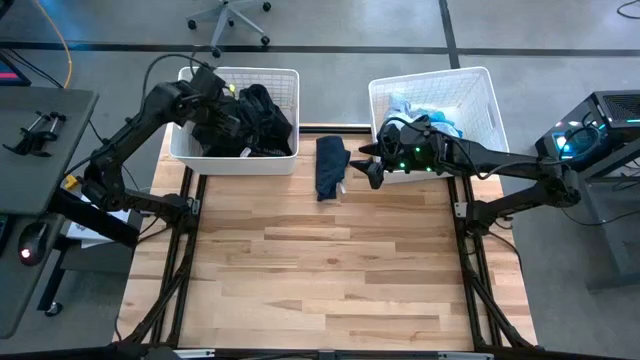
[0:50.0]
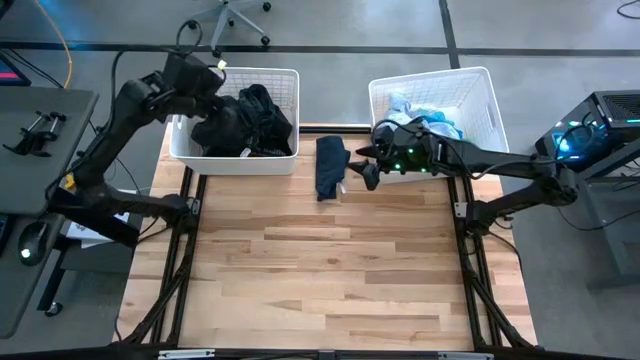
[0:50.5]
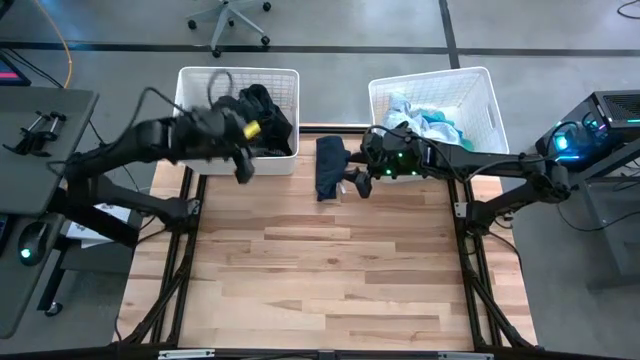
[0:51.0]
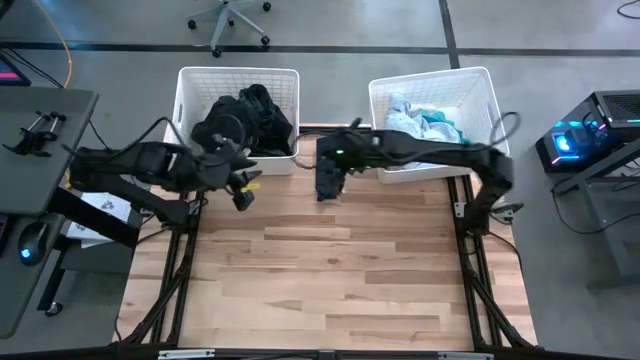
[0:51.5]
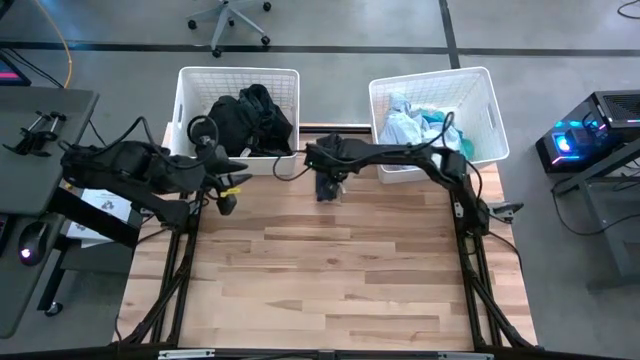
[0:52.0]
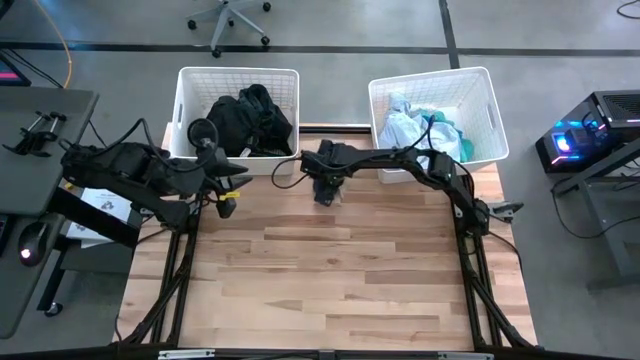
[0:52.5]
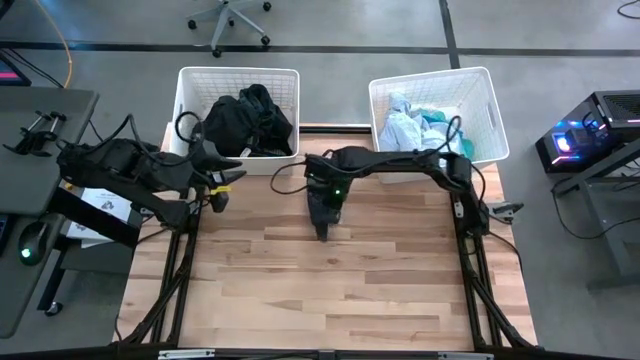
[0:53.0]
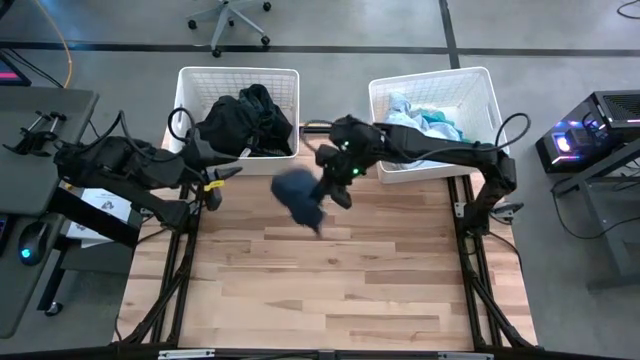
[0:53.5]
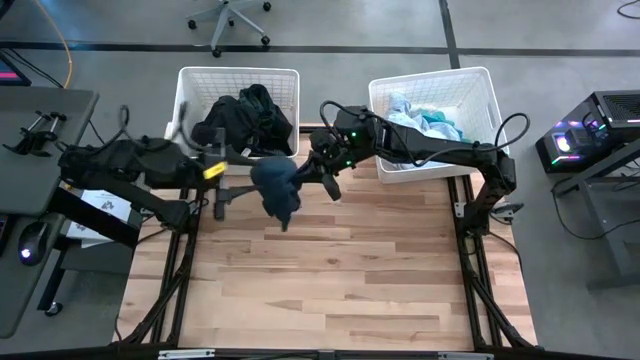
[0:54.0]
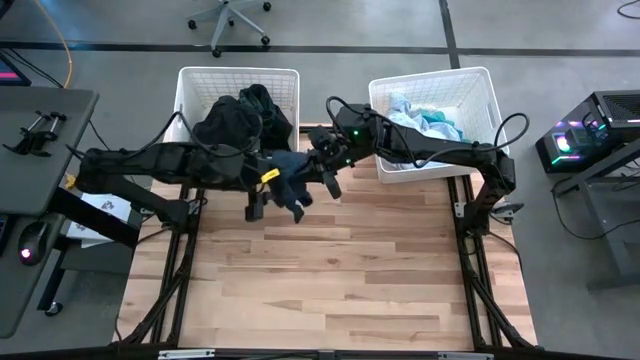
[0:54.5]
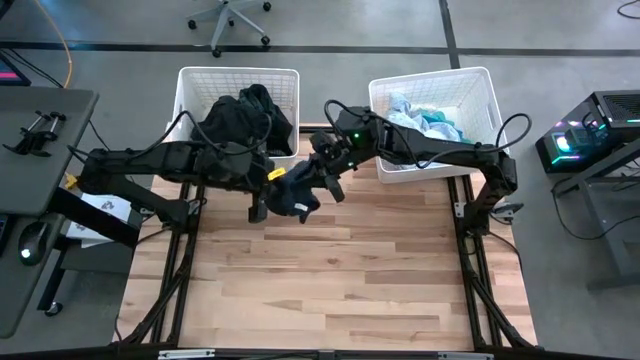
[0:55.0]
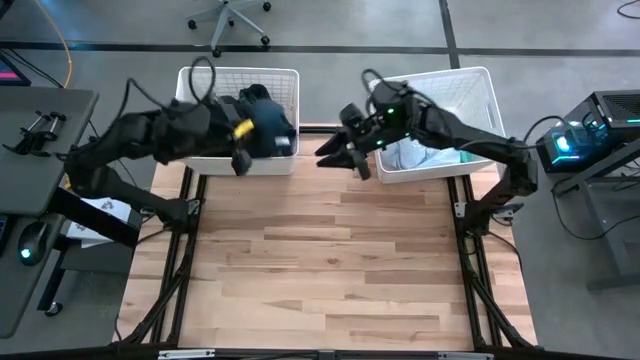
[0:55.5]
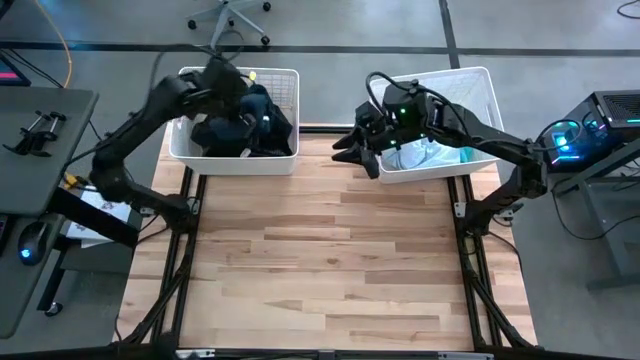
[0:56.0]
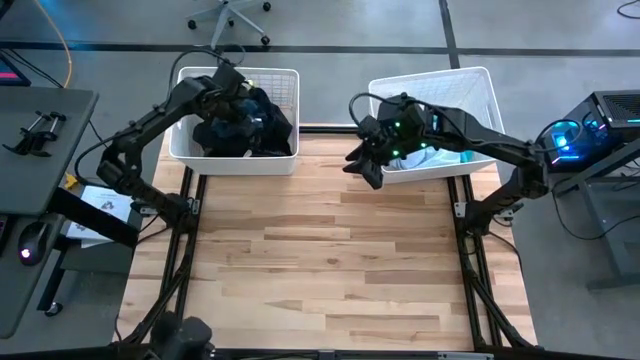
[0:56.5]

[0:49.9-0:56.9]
Task: Sort clothes
Put the dark blue shorts into the left white laundry organizer

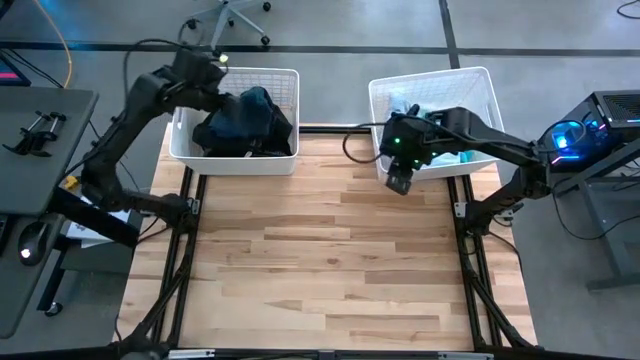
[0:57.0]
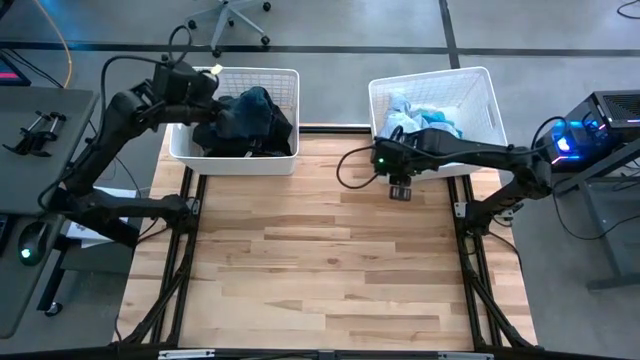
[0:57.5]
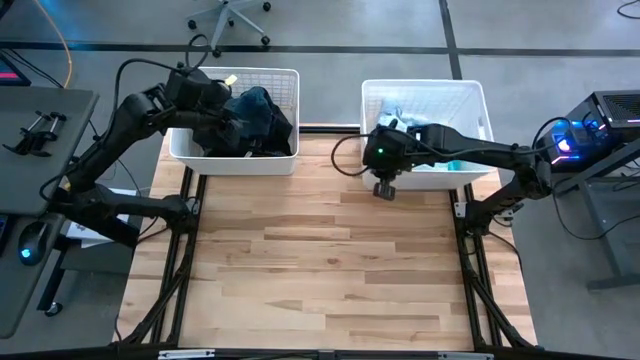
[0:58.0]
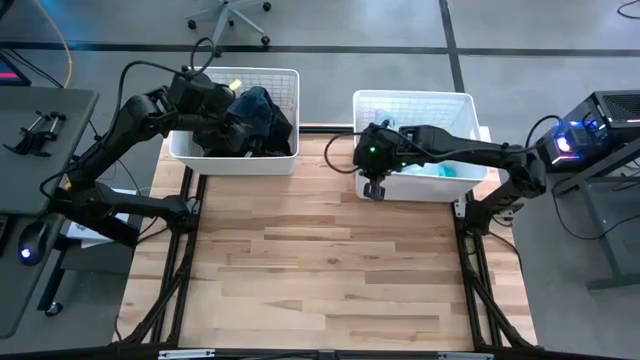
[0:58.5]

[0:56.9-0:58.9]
Adjust the right white laundry organizer

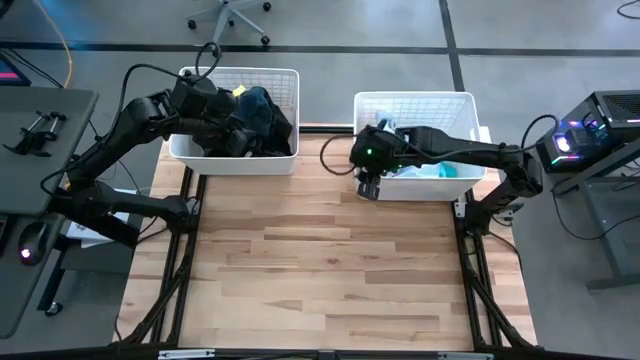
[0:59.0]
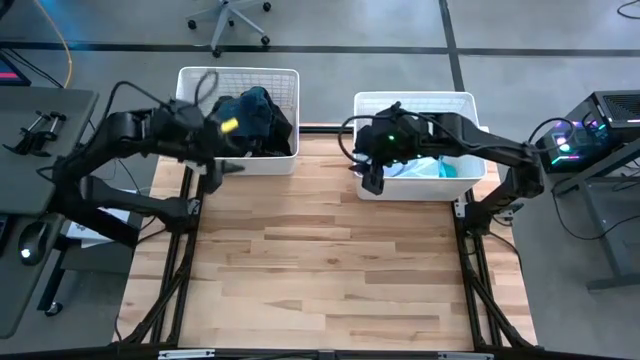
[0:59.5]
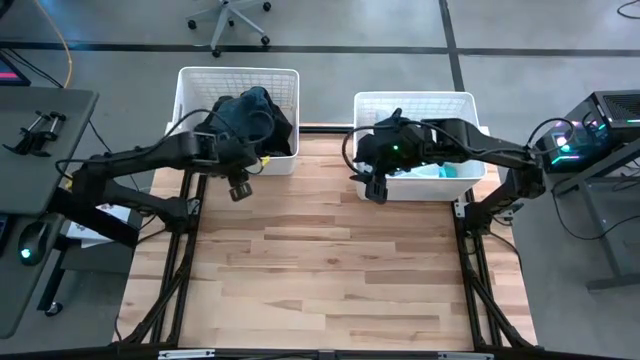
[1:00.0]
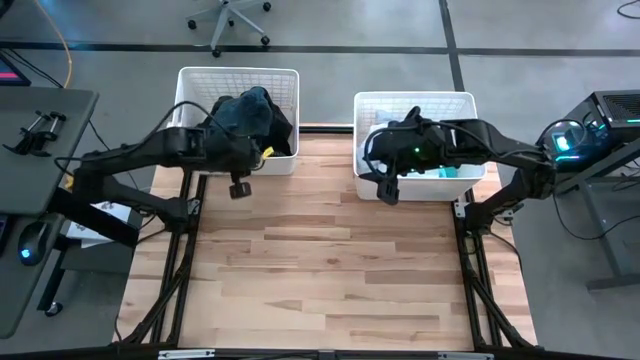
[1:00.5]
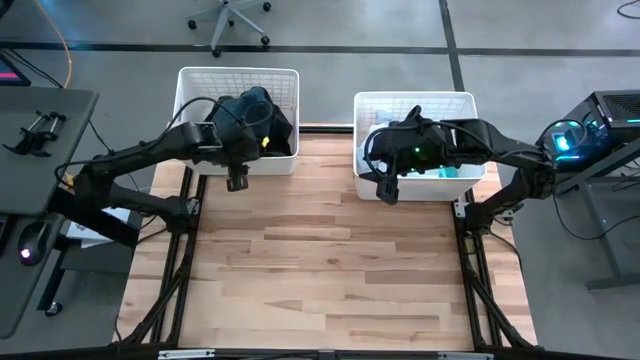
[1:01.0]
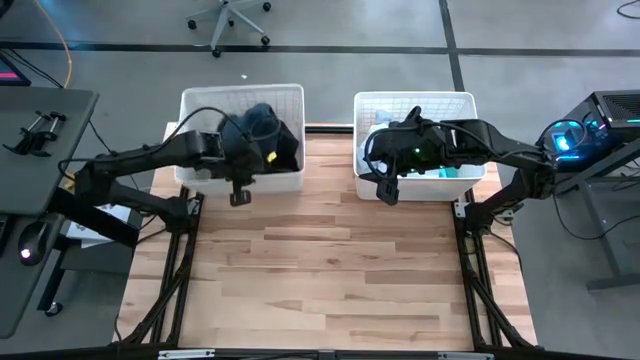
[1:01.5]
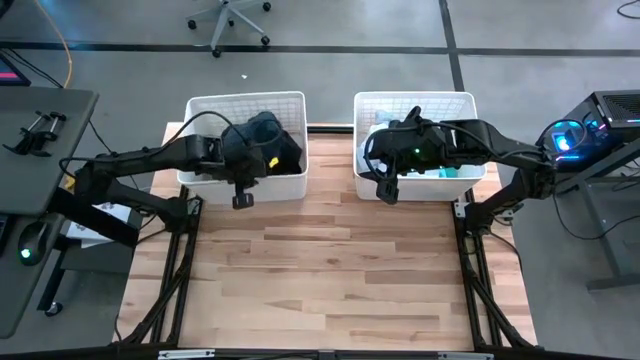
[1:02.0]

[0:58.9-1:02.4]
Adjust the left white laundry organizer

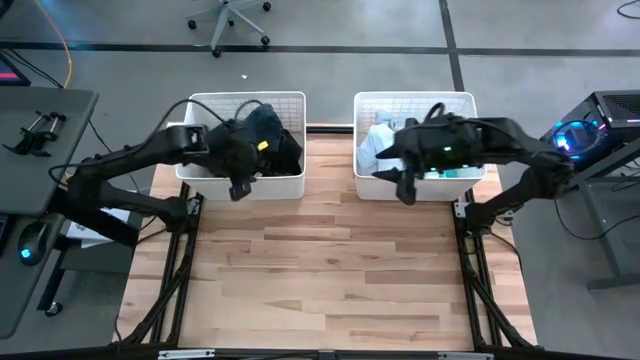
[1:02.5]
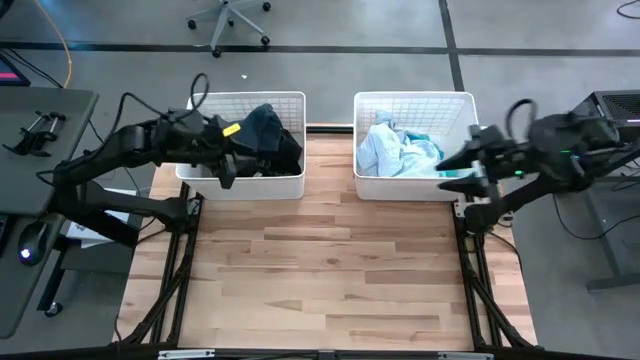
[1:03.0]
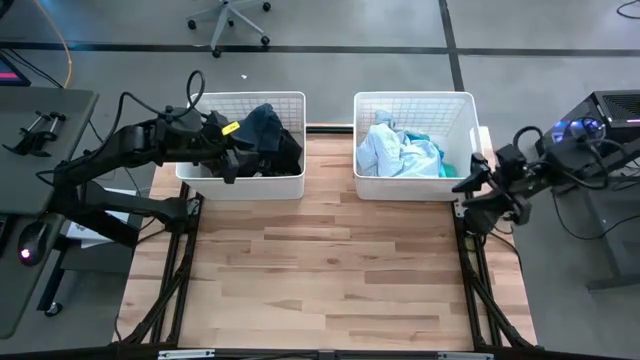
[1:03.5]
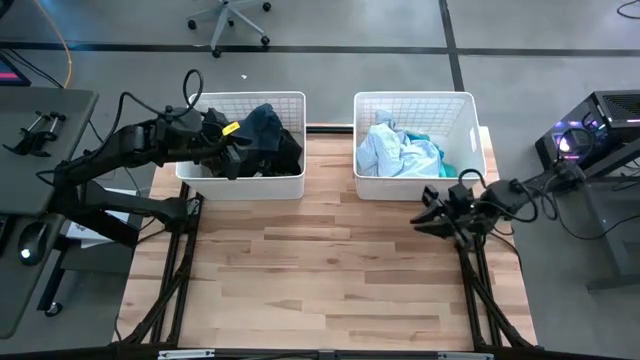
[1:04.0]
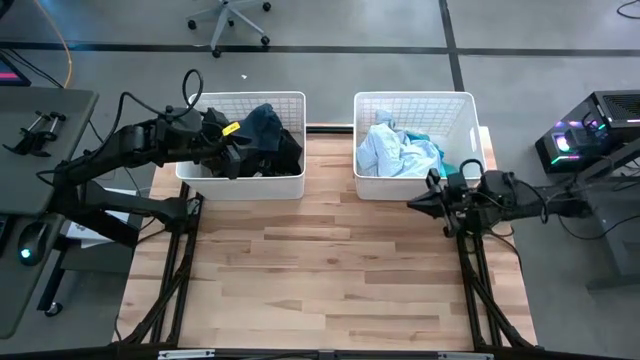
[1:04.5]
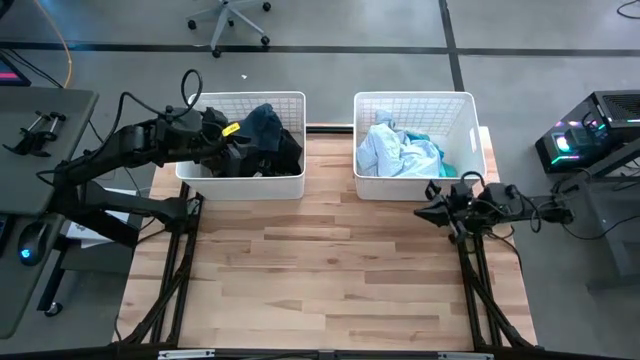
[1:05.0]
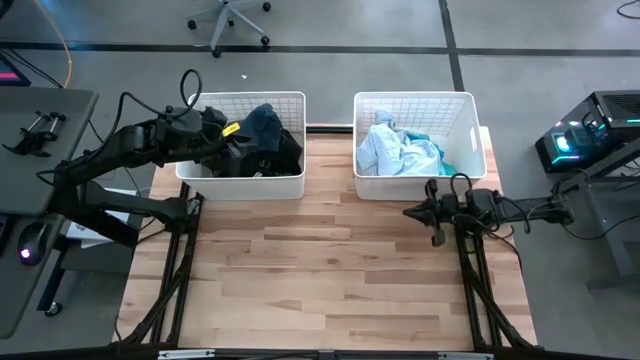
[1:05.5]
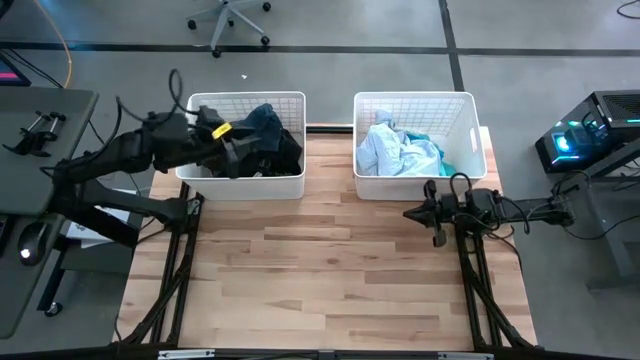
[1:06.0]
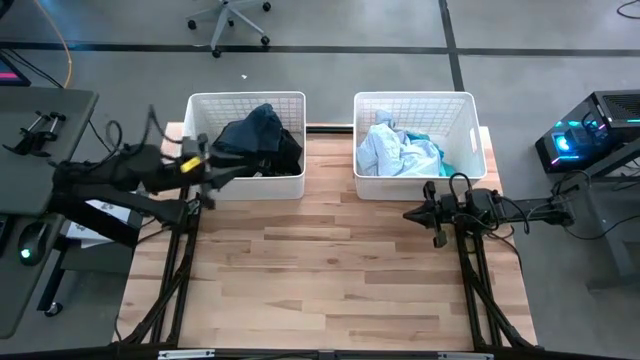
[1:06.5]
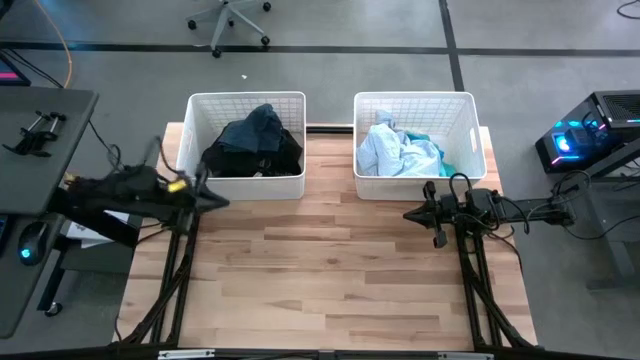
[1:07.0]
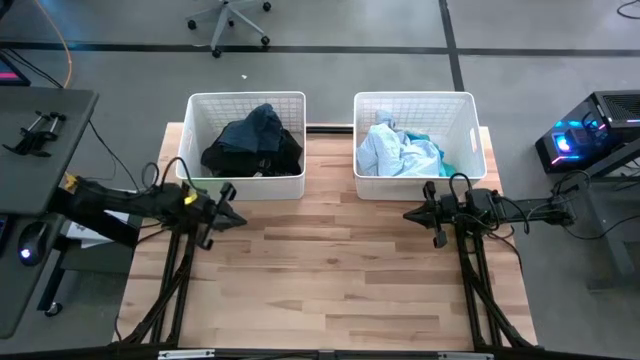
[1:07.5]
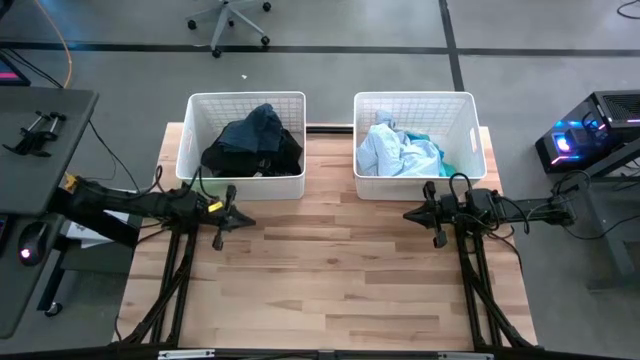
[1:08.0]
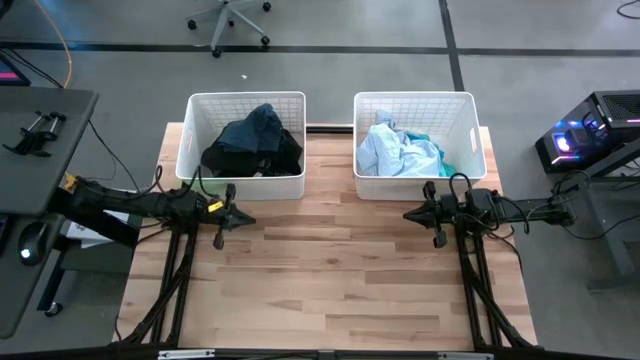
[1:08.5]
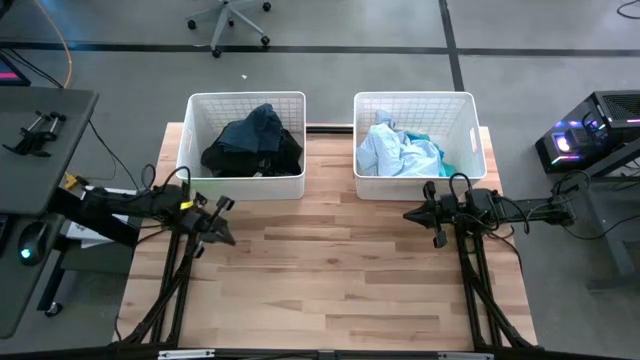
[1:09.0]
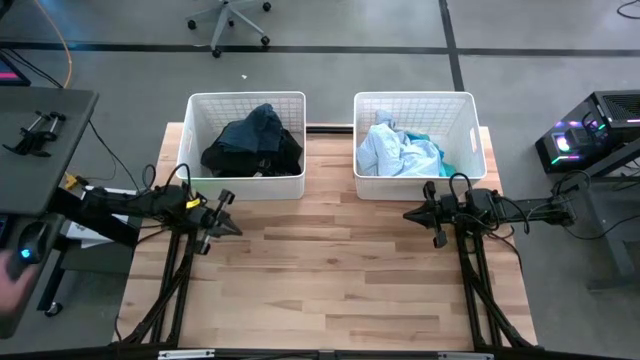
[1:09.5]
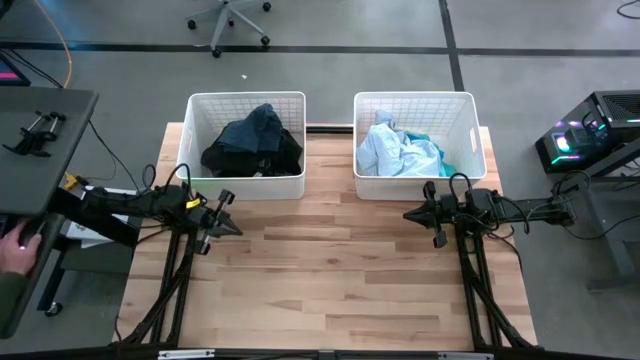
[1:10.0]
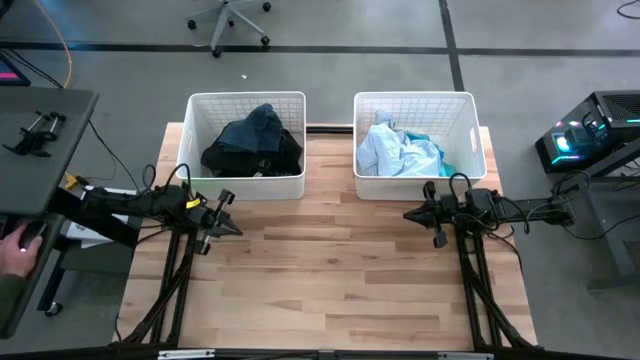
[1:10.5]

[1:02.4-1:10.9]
Return to Home Position
